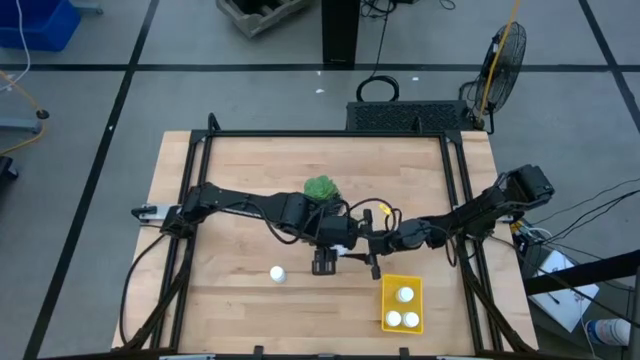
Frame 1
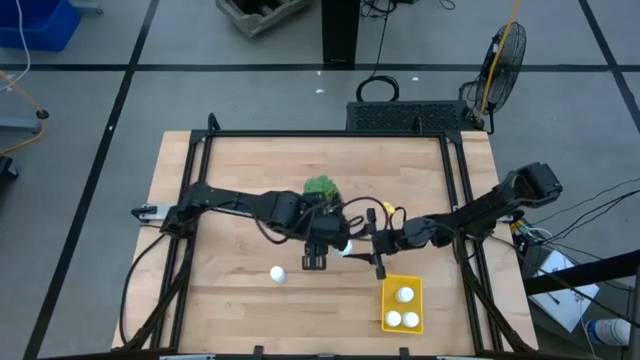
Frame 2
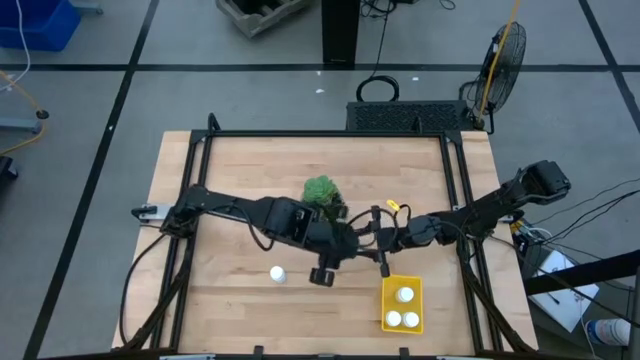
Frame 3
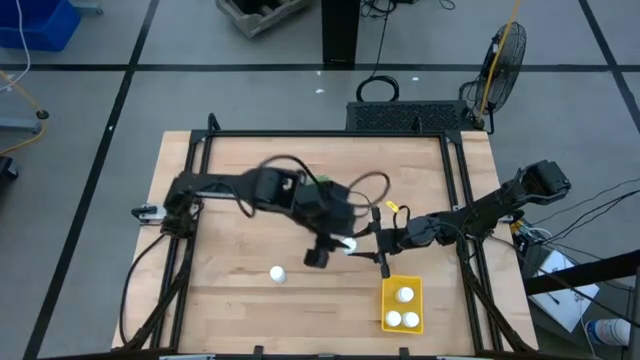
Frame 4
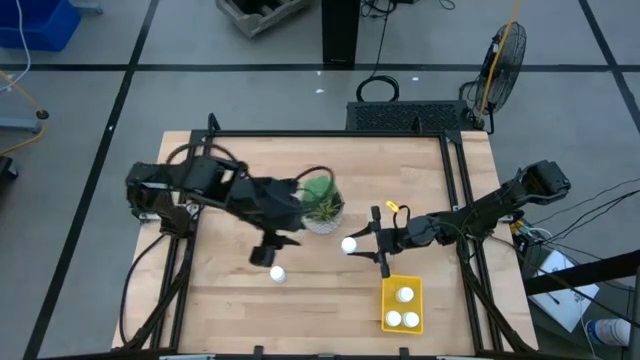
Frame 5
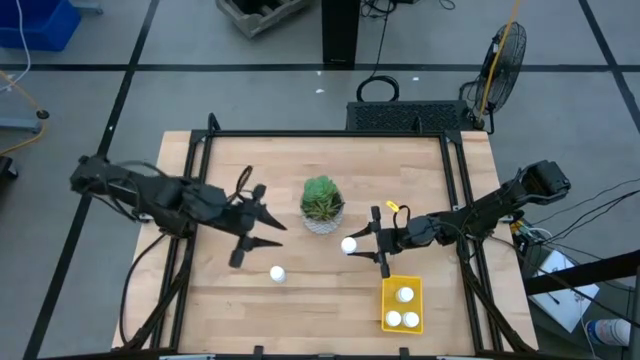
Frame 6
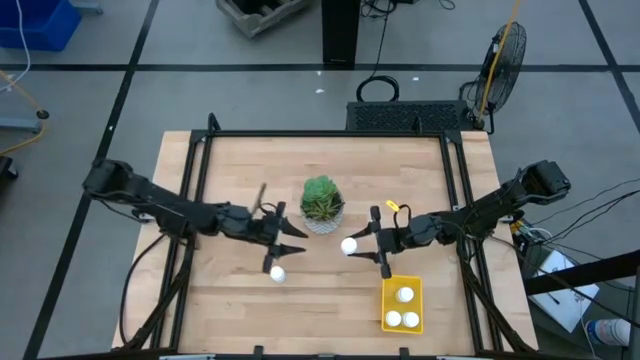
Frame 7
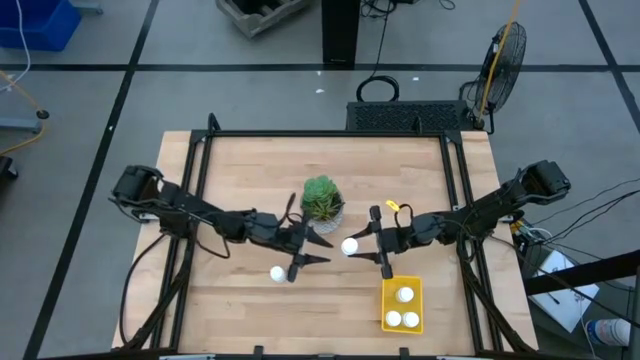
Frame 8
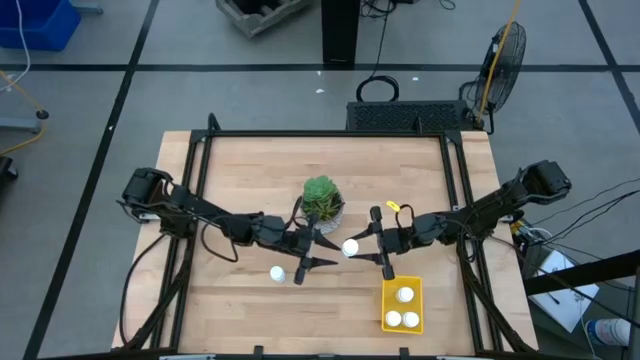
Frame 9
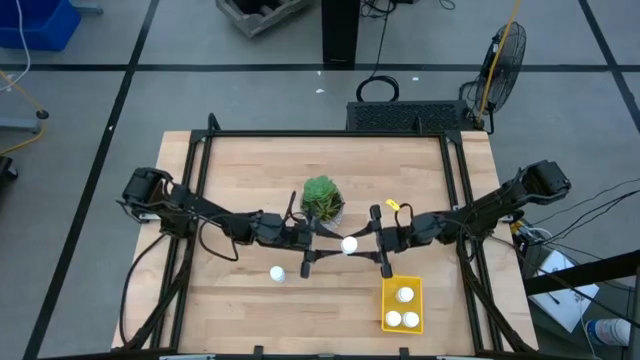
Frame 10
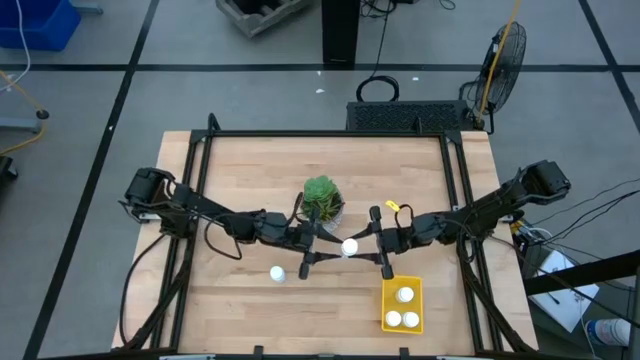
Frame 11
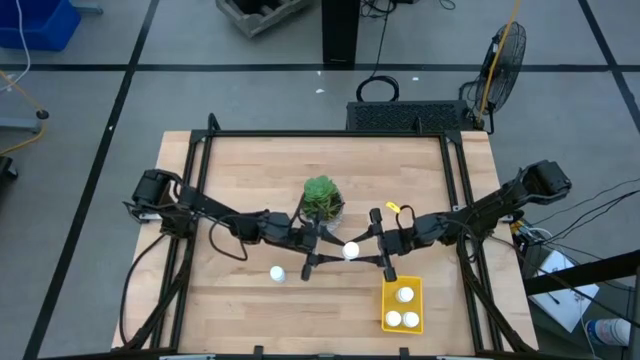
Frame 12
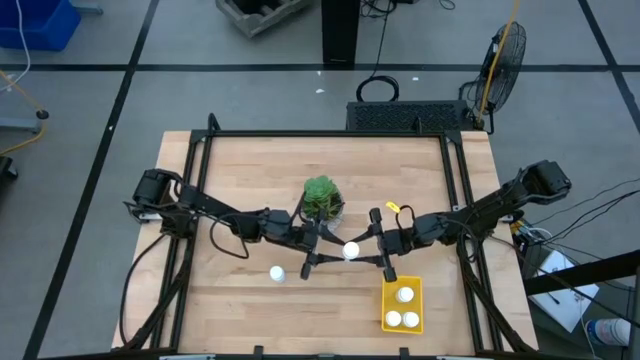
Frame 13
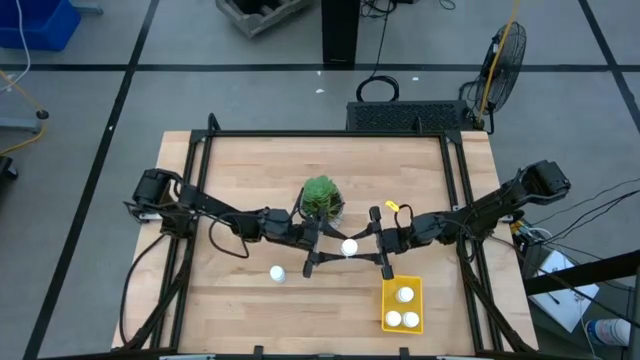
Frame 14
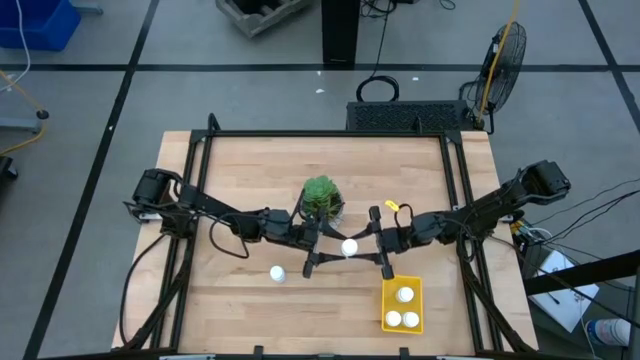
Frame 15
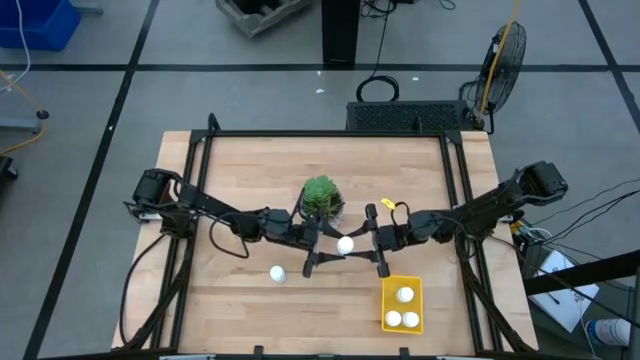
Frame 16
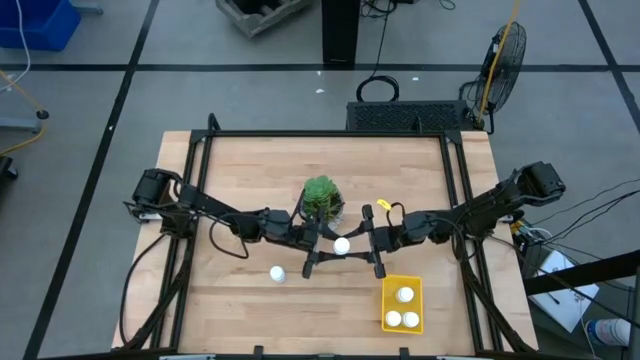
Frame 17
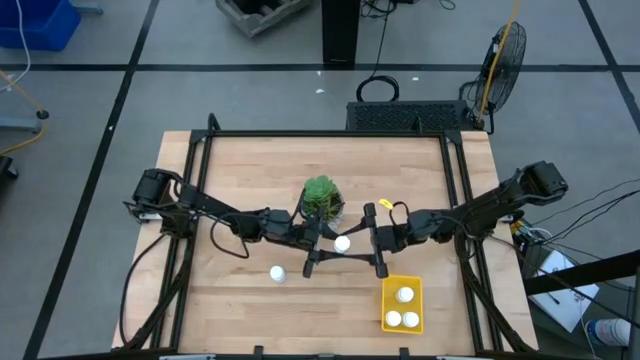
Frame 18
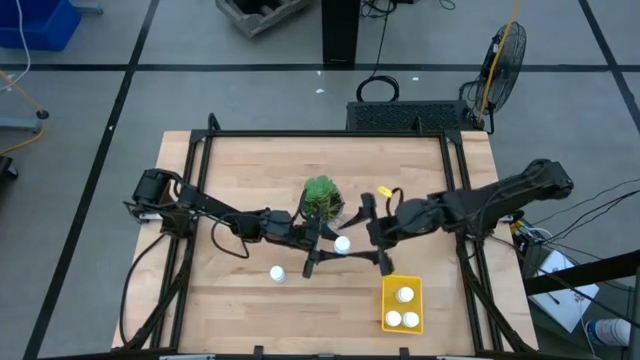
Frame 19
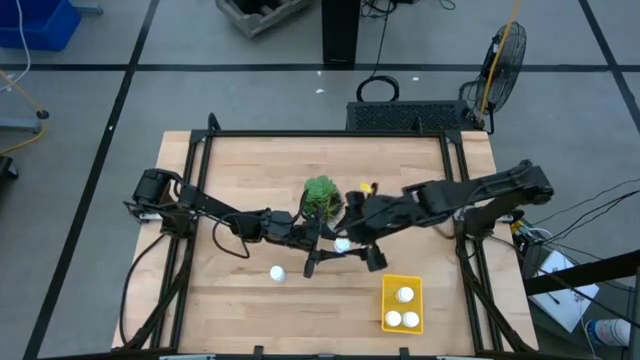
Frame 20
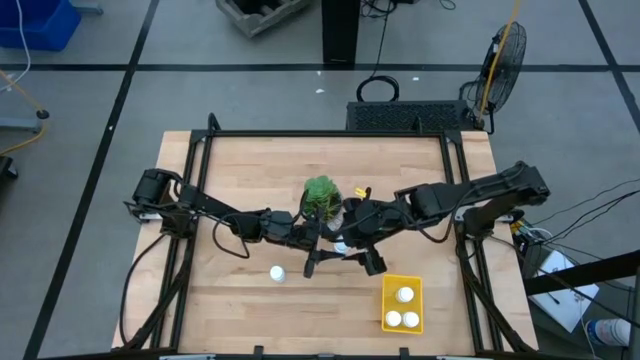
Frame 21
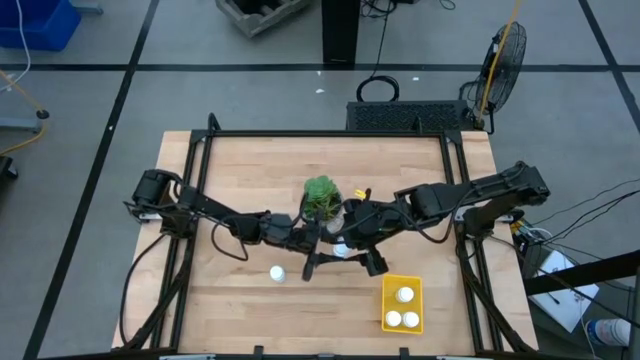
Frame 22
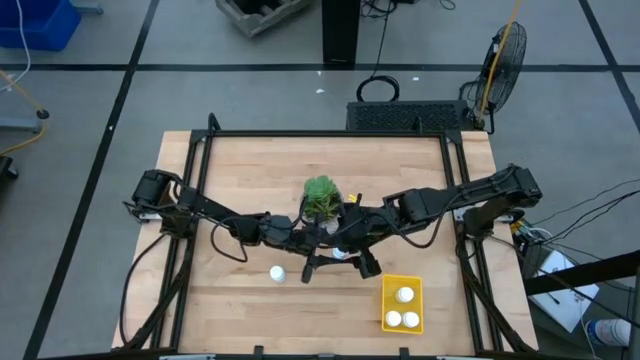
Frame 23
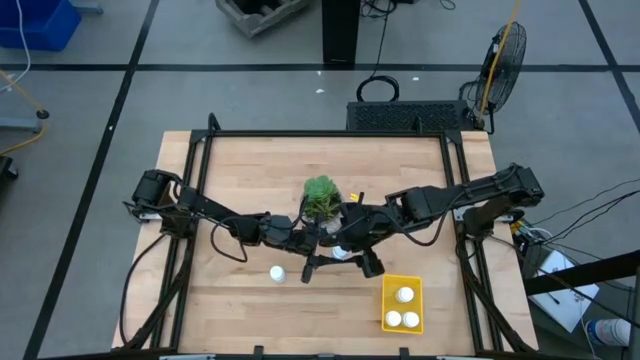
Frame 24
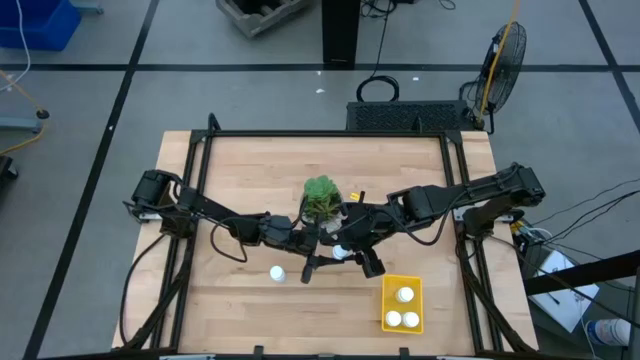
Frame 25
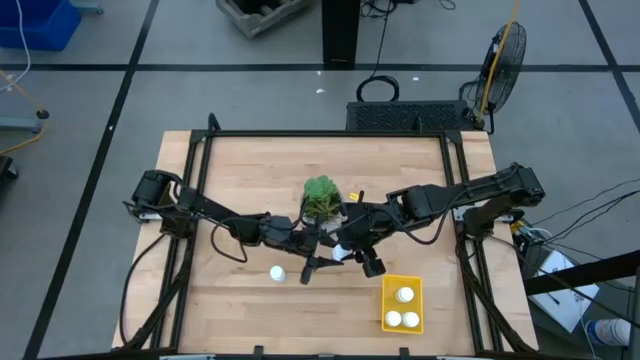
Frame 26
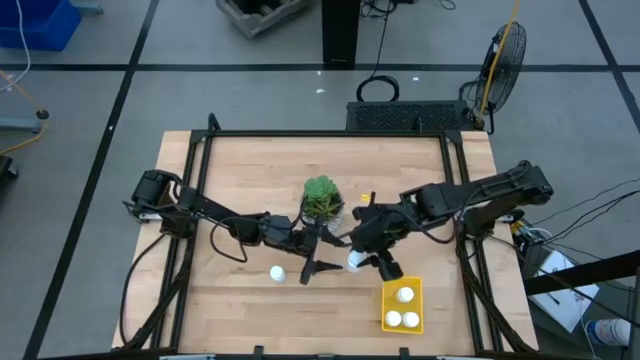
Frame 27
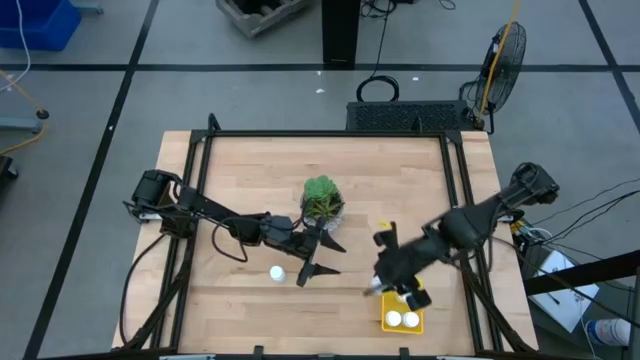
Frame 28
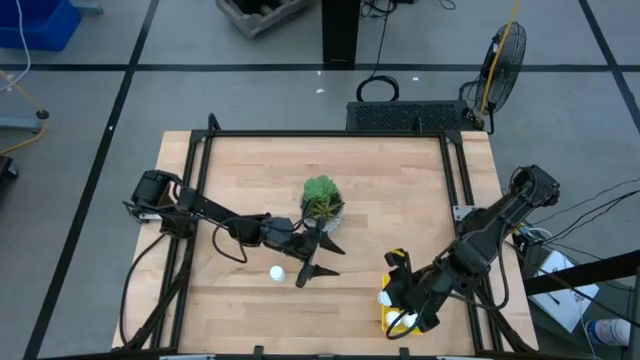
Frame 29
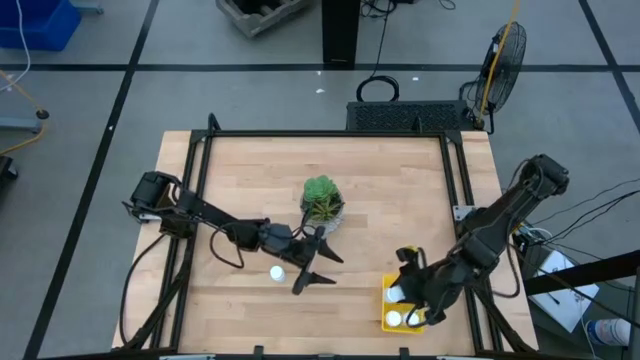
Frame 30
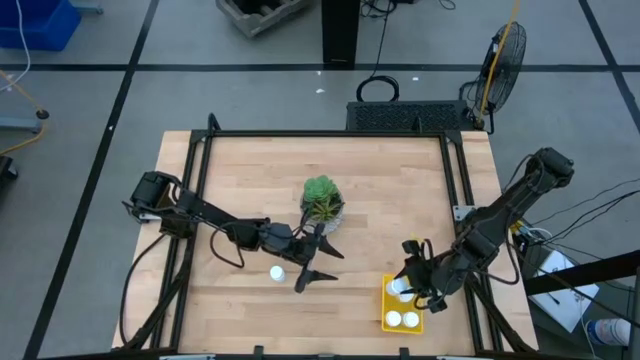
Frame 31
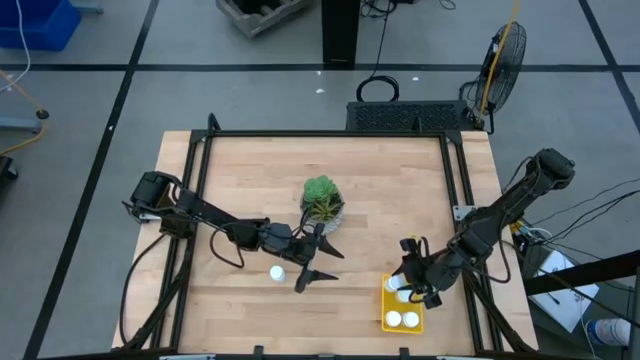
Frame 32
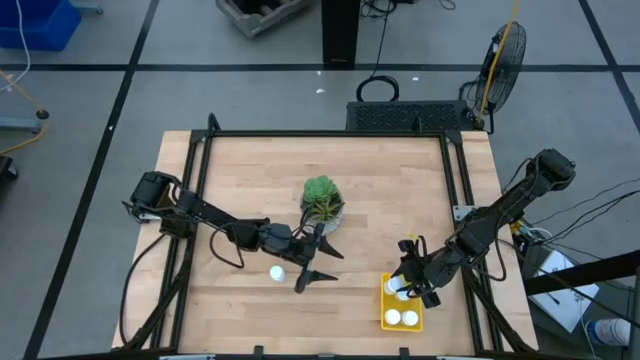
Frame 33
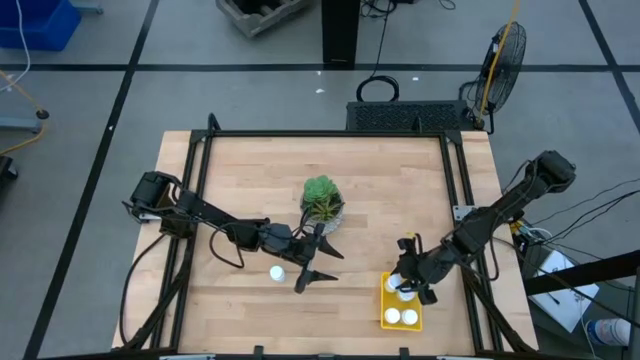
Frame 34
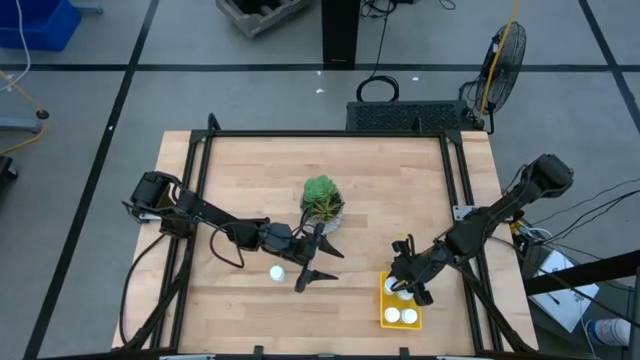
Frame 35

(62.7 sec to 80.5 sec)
Task: Pick and place pill bottles into a basket
Put the white pill bottle into the bin

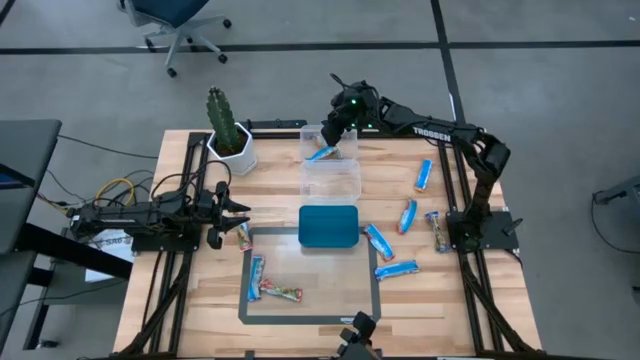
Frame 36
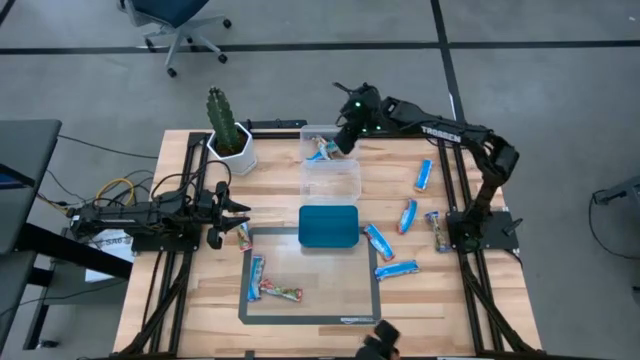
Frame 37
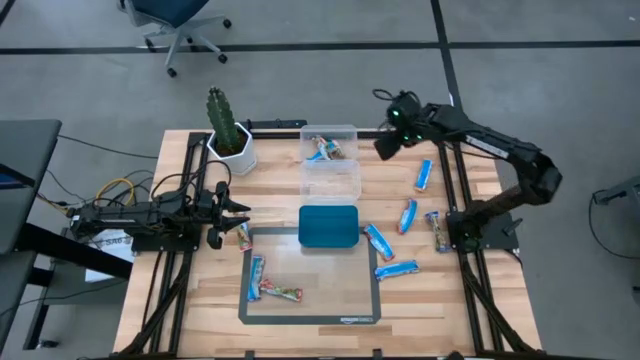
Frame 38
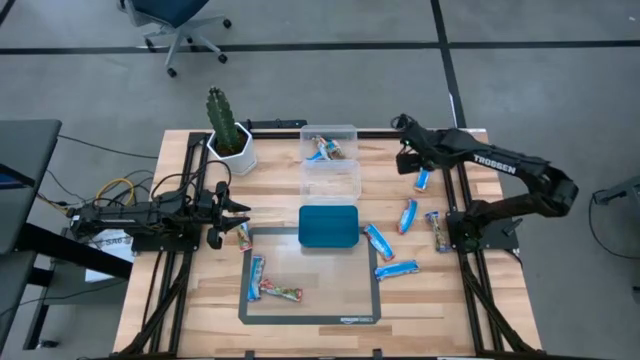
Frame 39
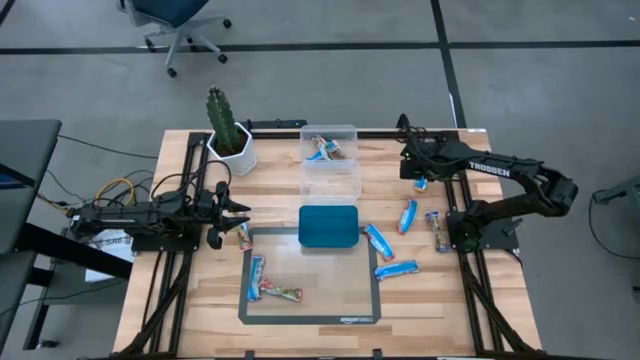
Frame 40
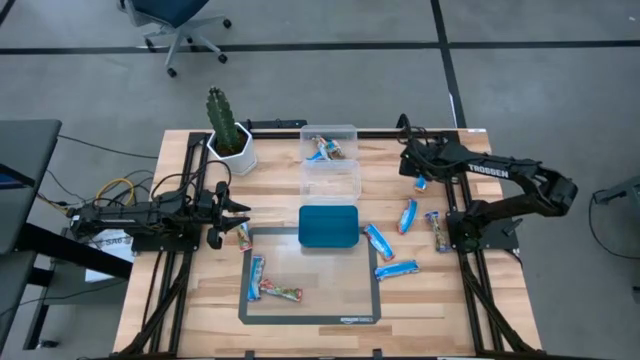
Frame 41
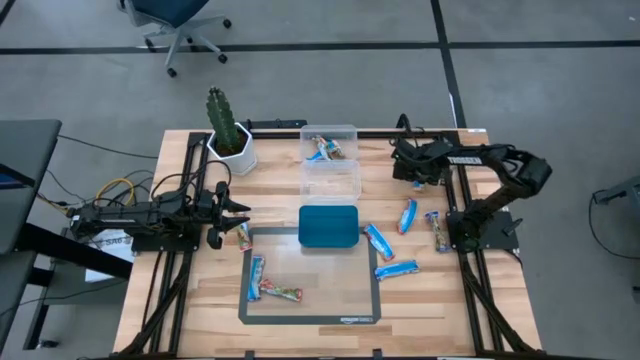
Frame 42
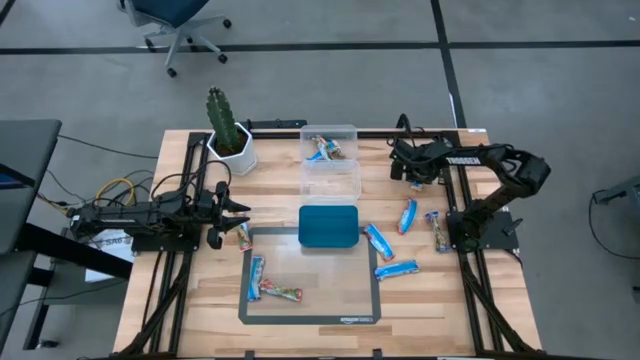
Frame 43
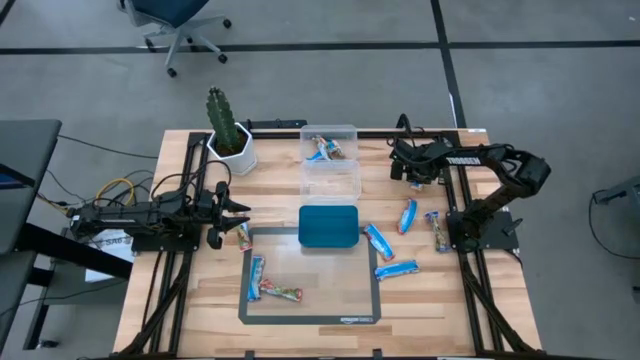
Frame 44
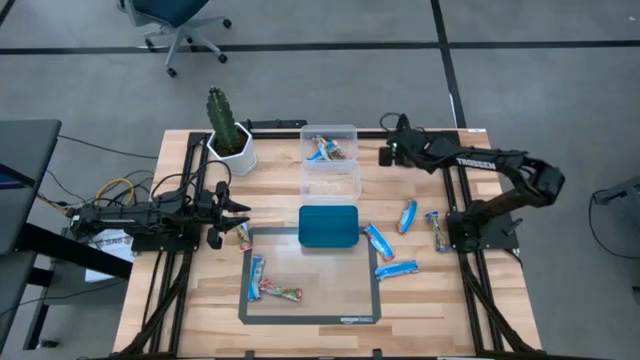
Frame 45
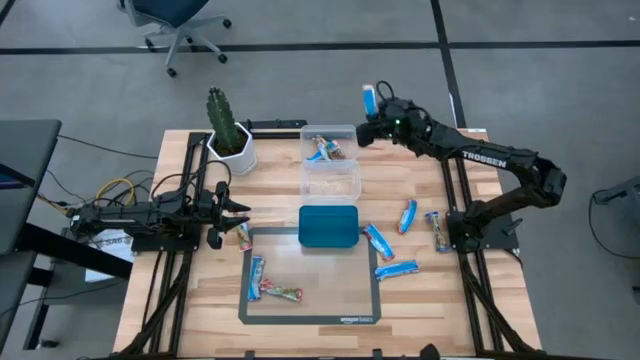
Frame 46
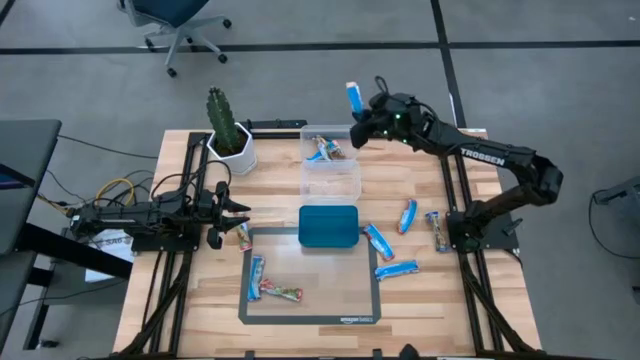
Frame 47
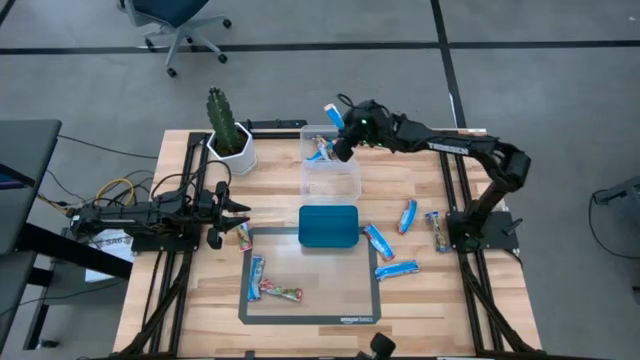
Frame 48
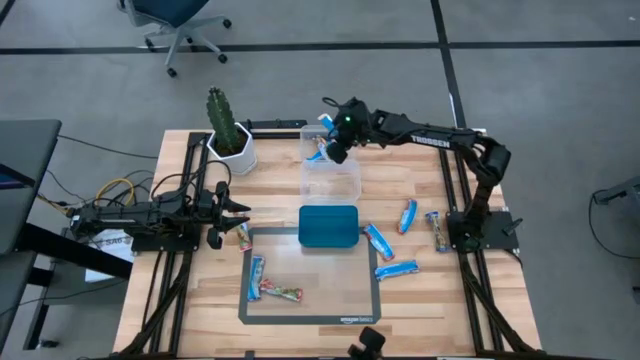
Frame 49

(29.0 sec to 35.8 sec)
Task: Pick and place Granola Bars by type
Put the yellow granola bar into the top transparent bin
